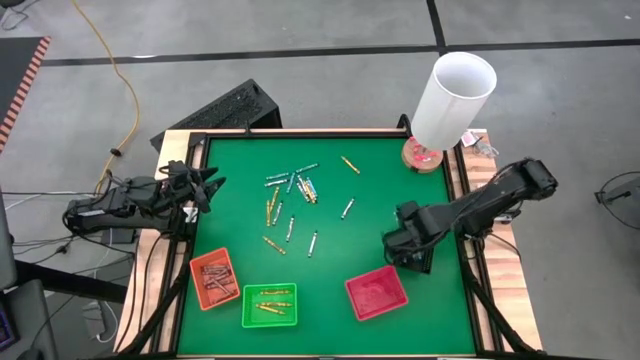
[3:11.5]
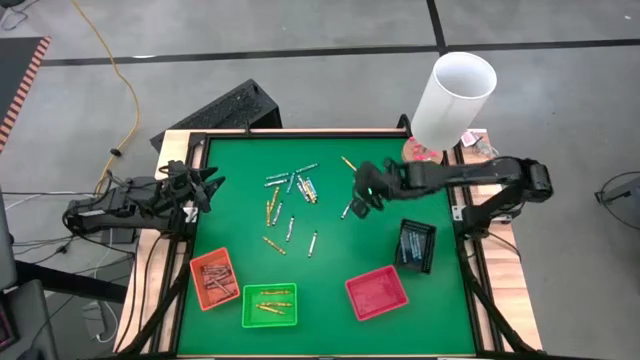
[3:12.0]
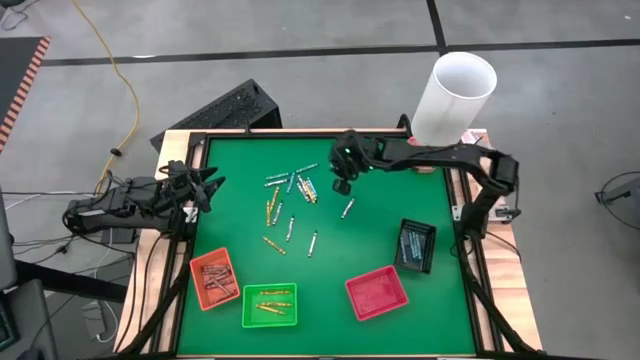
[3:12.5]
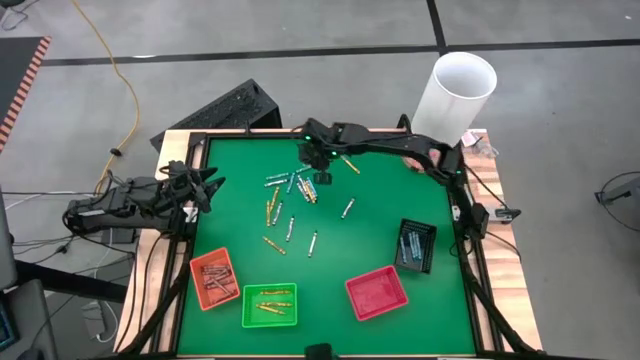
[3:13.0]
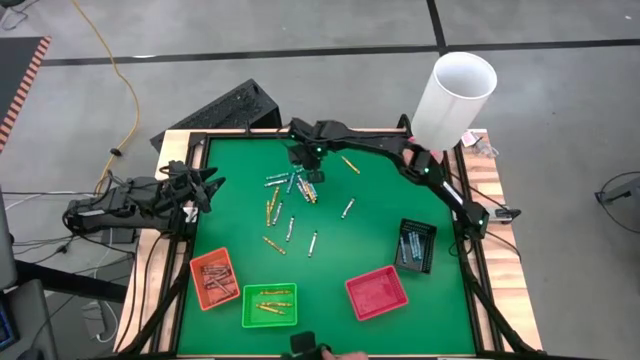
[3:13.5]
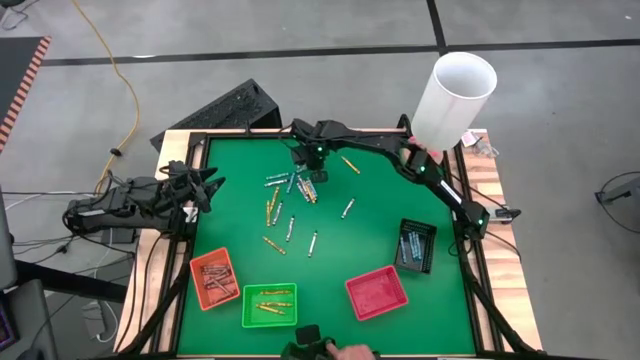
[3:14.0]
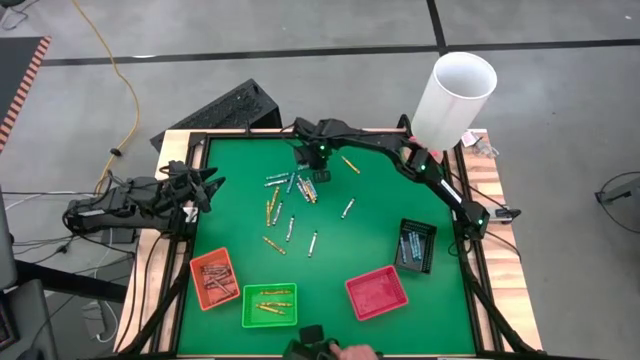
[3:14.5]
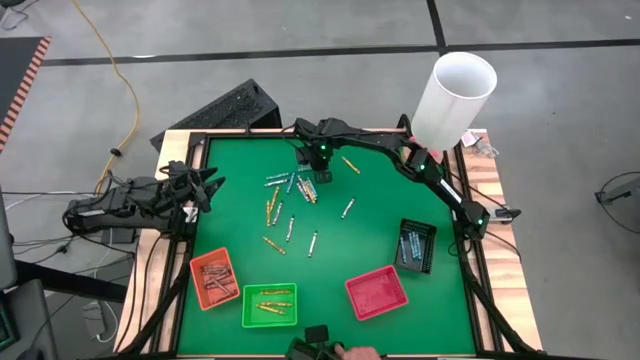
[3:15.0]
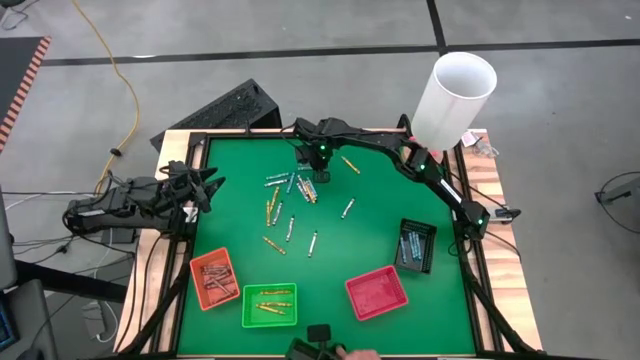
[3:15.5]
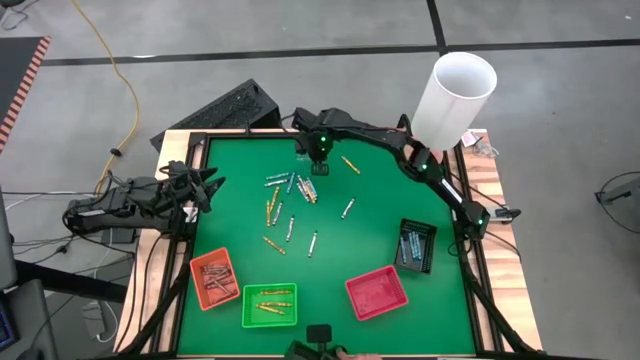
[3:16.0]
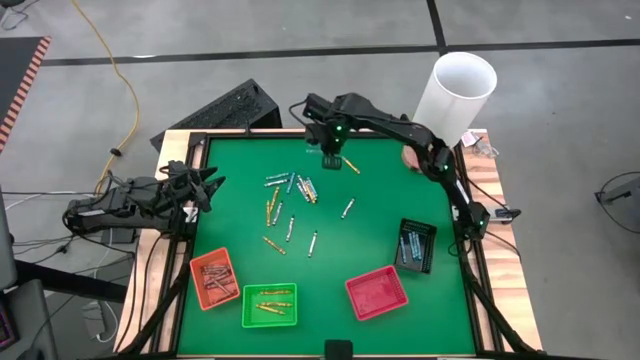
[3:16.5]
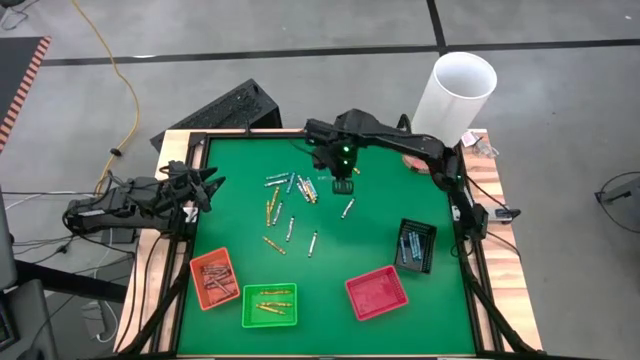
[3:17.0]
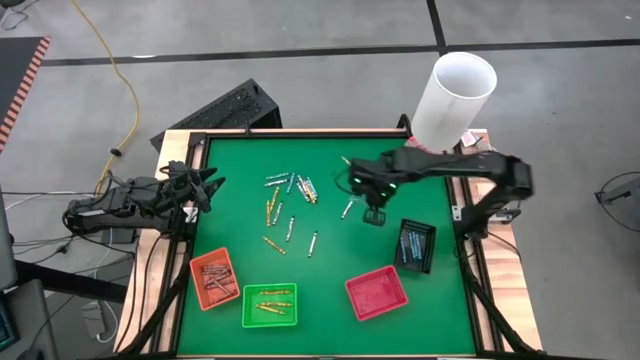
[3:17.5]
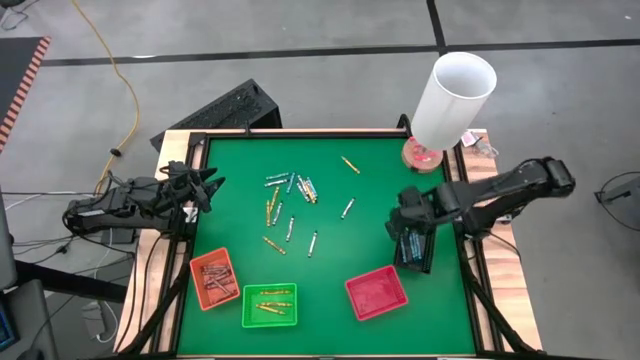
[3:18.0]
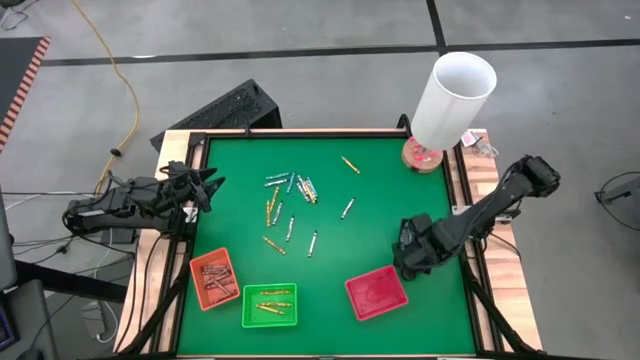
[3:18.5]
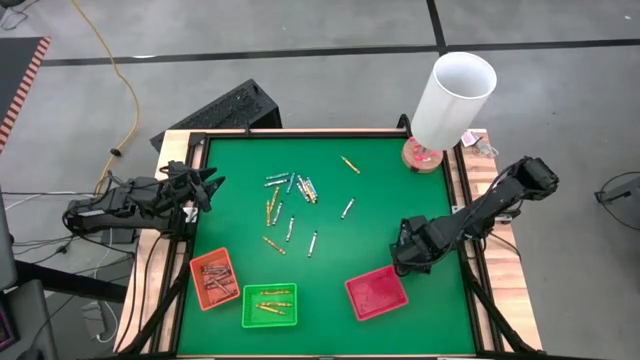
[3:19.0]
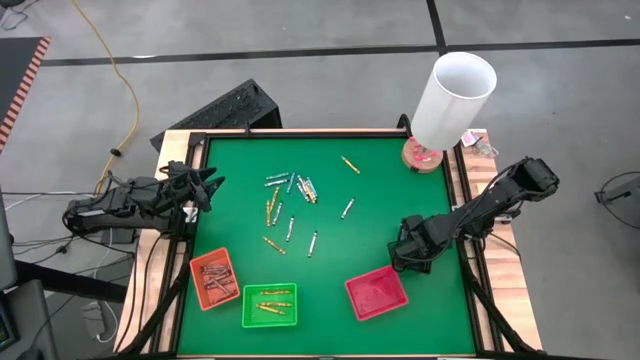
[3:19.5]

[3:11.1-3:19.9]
Task: Sort crayons
Put the blue crayon into the black bin

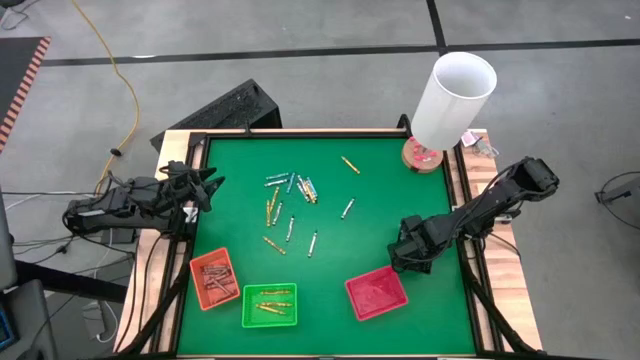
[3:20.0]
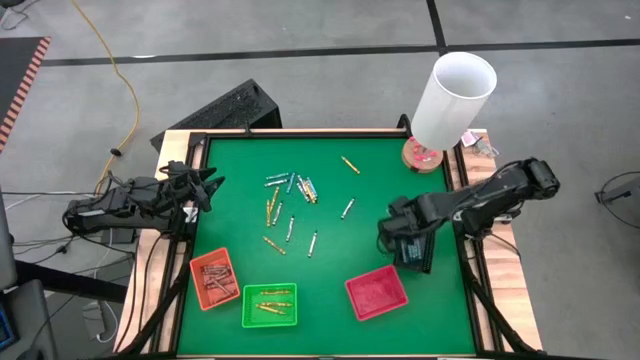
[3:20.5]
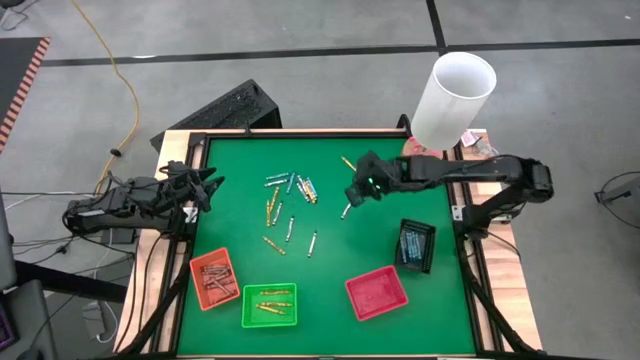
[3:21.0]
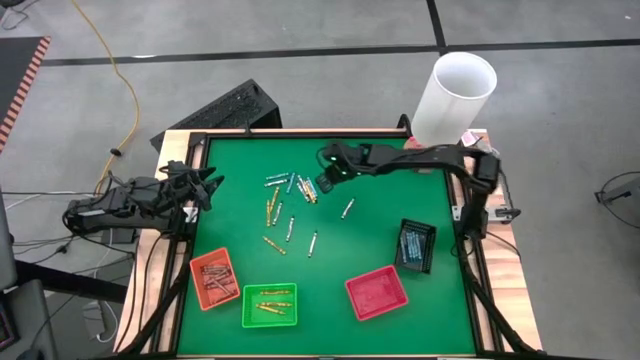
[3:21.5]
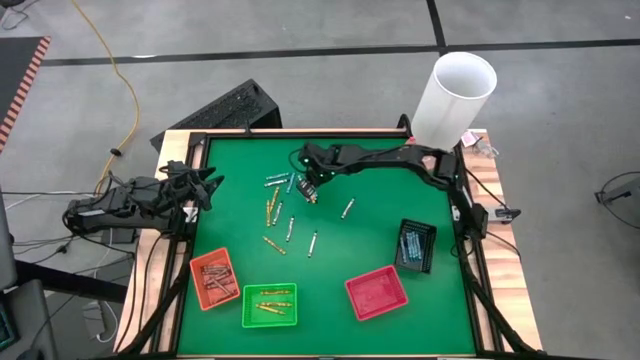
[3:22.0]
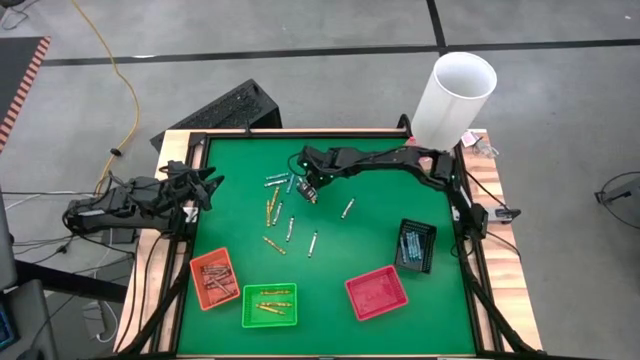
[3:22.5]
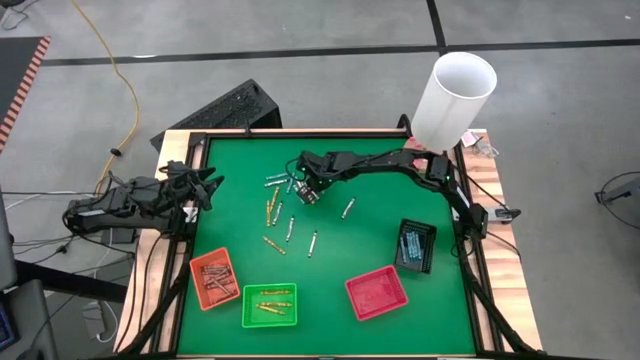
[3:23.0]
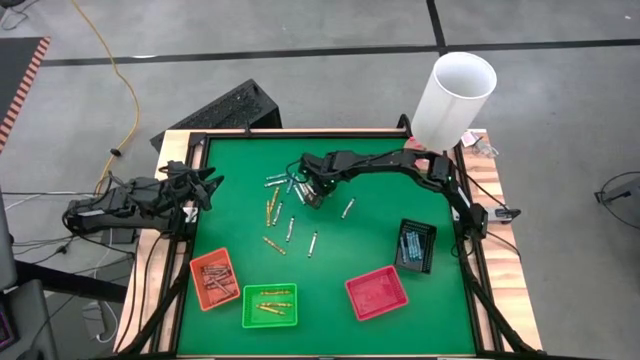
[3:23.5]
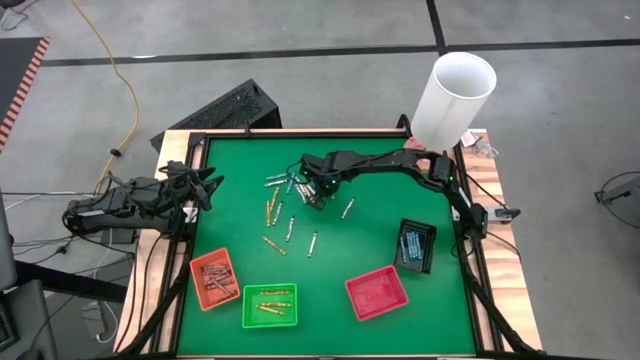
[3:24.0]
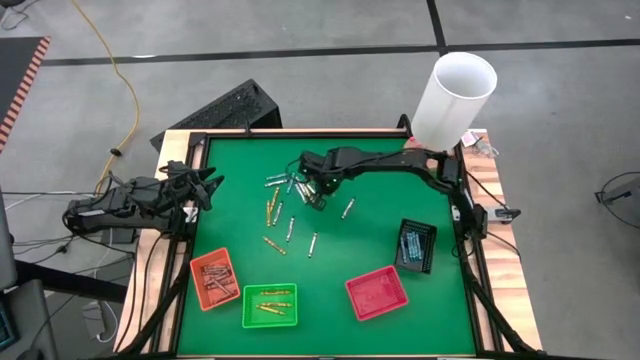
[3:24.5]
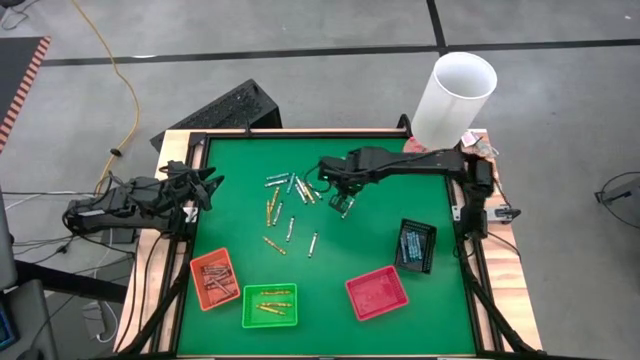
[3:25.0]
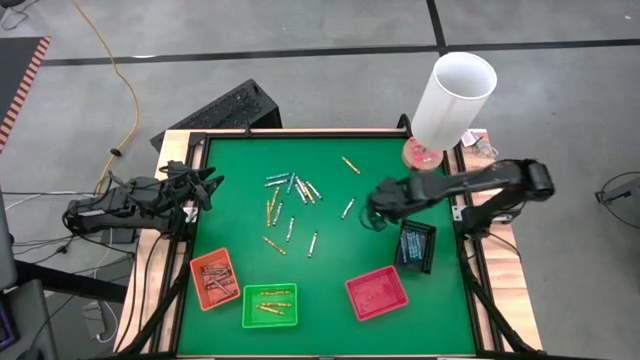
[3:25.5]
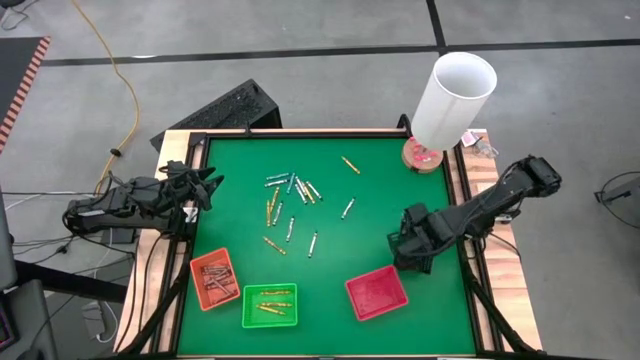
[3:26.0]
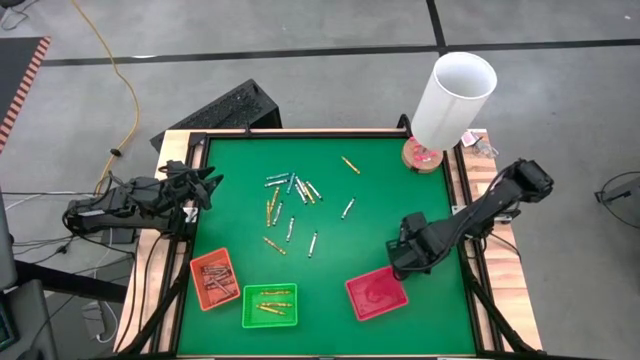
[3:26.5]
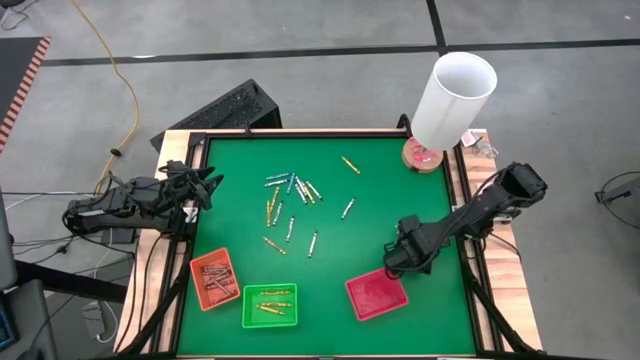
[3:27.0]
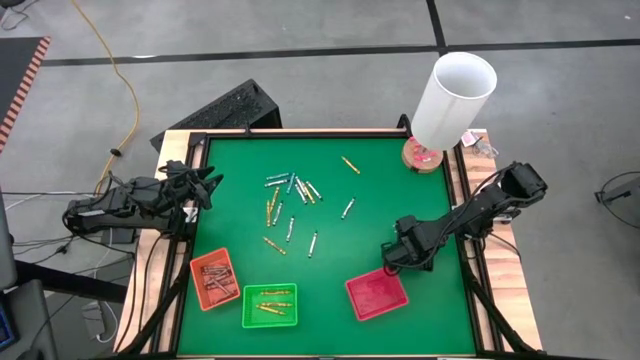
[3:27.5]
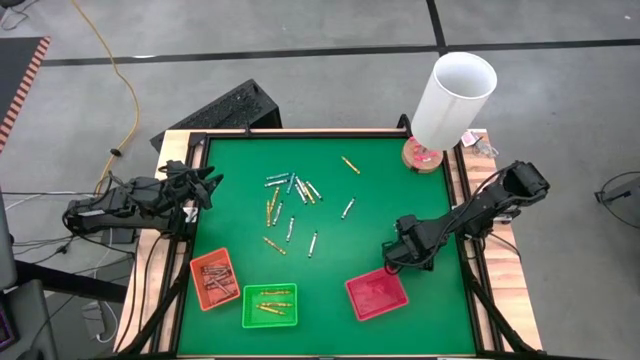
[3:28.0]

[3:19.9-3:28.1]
Put the blue crayon into the black bin

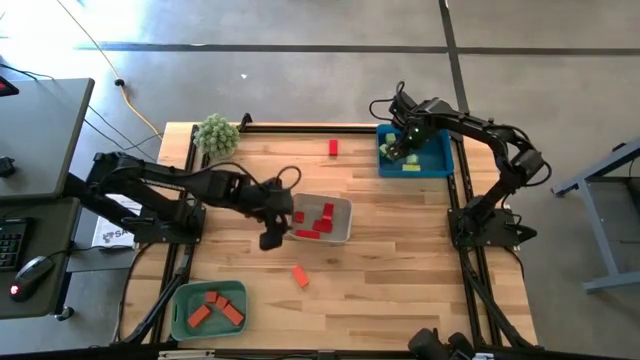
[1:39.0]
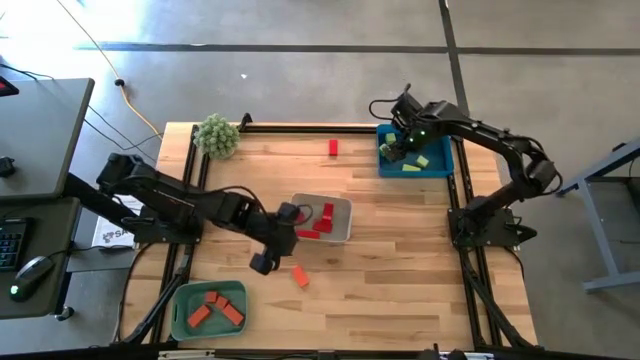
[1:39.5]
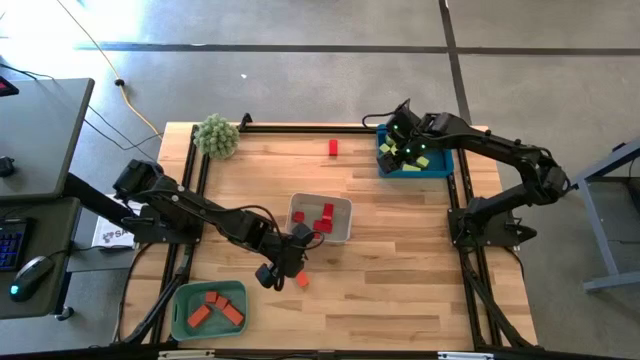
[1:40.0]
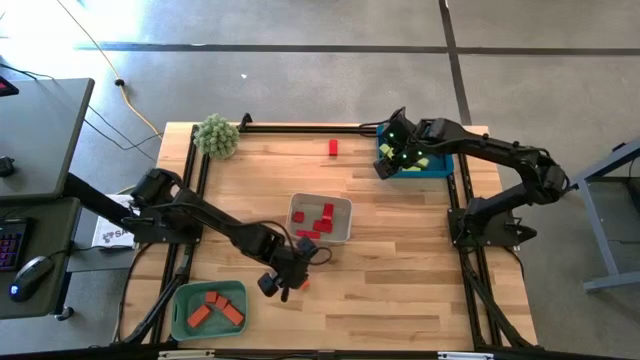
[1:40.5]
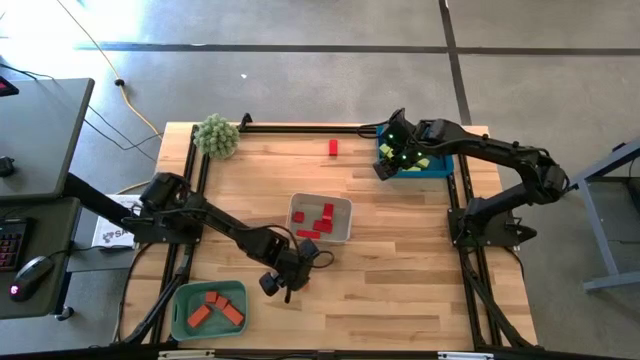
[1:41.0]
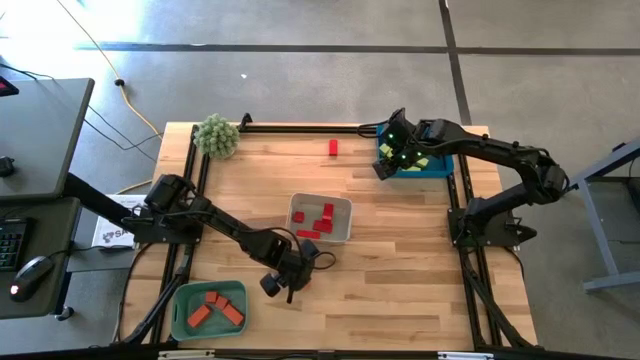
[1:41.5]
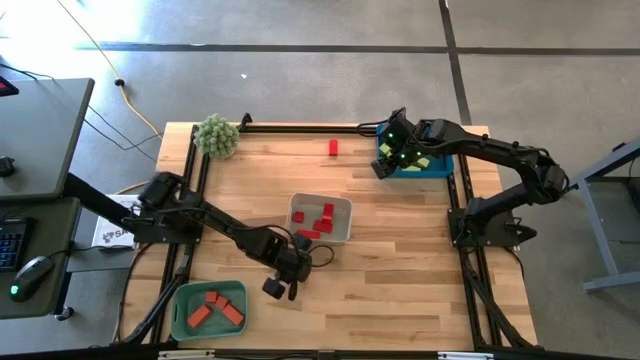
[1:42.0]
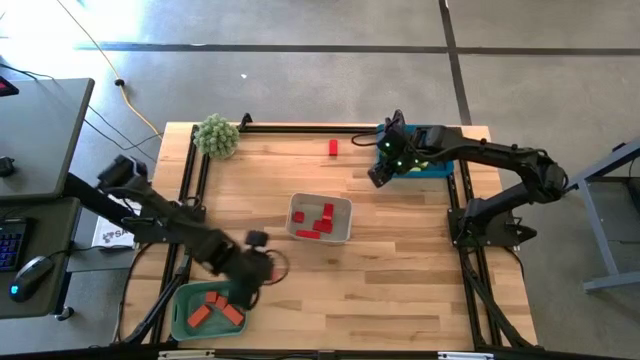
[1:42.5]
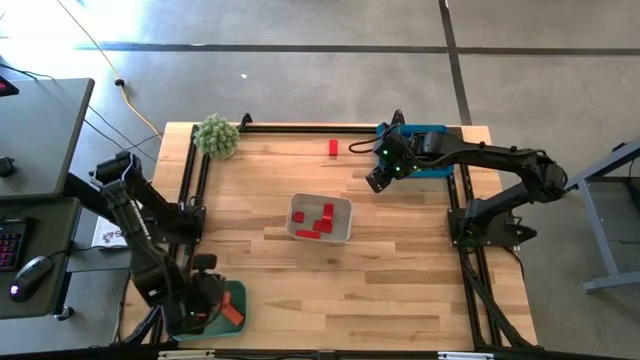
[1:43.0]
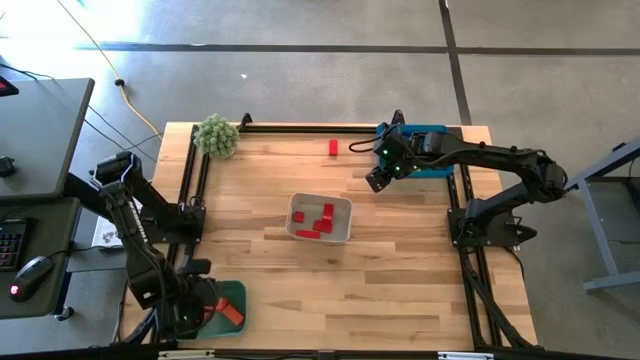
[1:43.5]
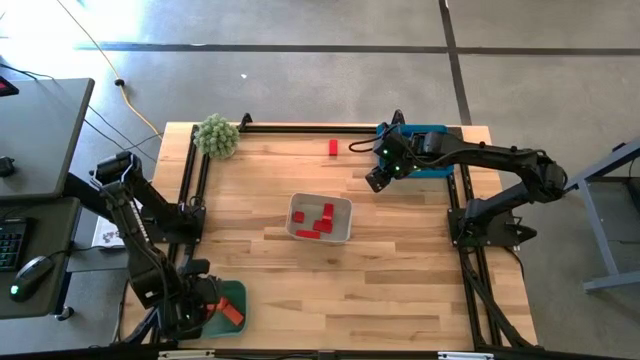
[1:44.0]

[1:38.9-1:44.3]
Task: Sort & place blocks by color
Put the orange wooden block into the green bin
